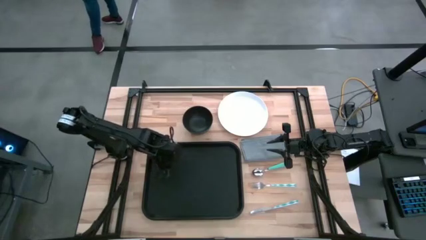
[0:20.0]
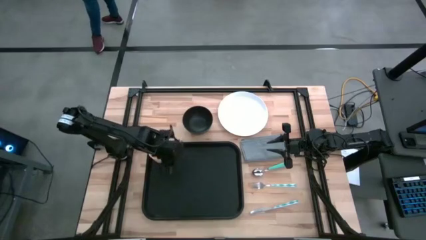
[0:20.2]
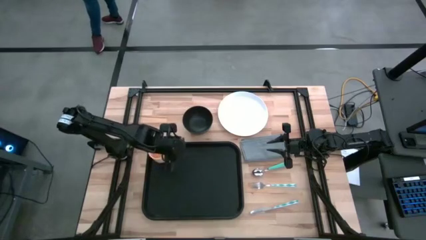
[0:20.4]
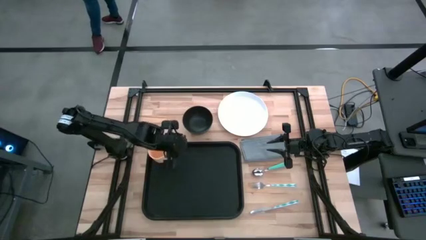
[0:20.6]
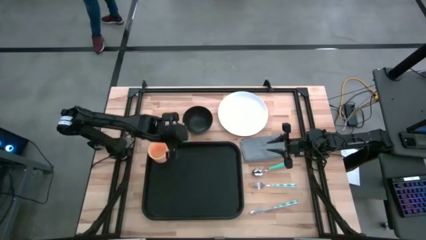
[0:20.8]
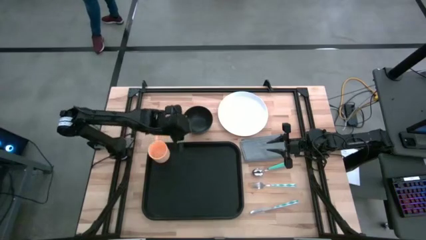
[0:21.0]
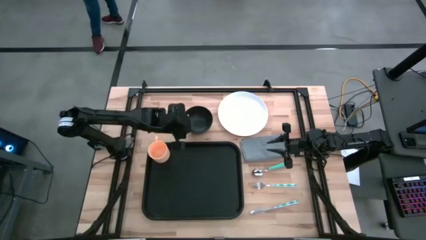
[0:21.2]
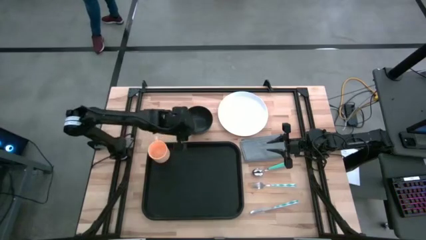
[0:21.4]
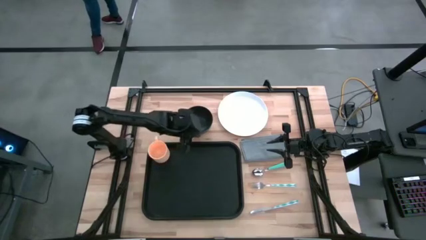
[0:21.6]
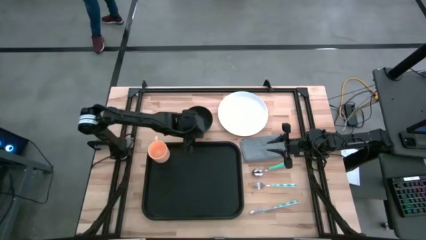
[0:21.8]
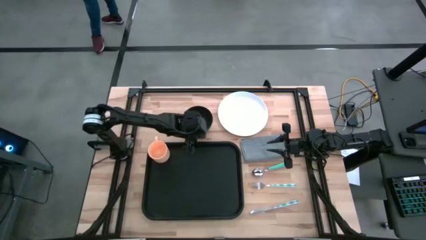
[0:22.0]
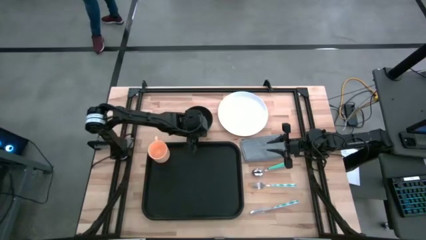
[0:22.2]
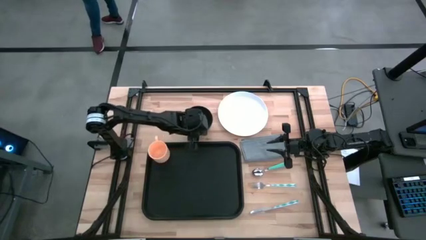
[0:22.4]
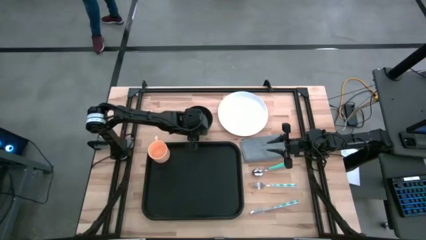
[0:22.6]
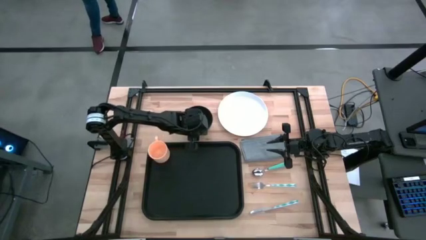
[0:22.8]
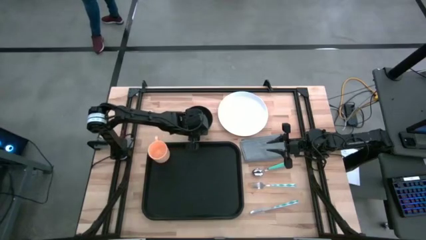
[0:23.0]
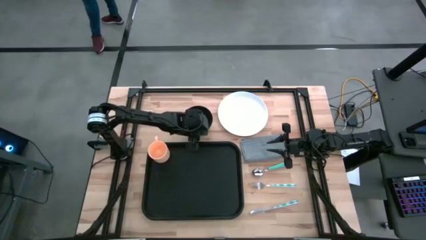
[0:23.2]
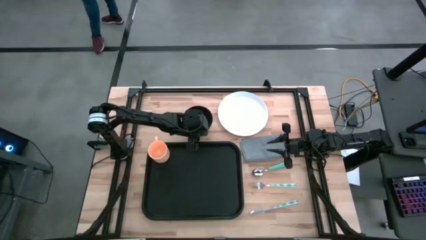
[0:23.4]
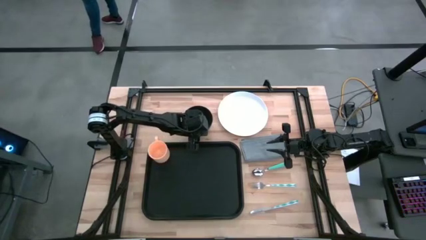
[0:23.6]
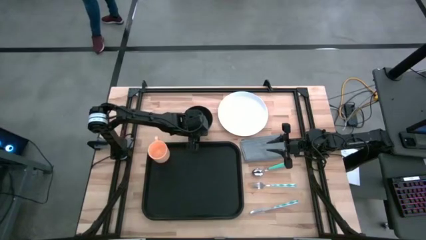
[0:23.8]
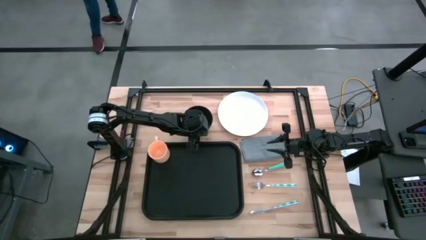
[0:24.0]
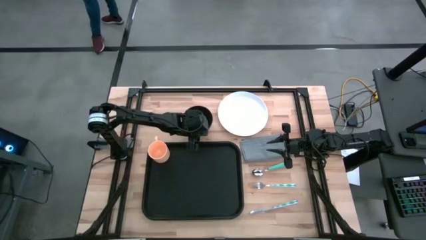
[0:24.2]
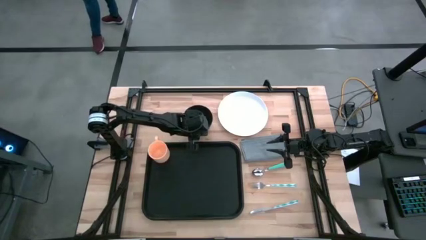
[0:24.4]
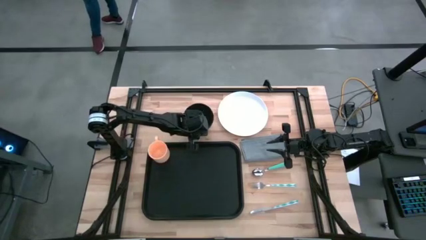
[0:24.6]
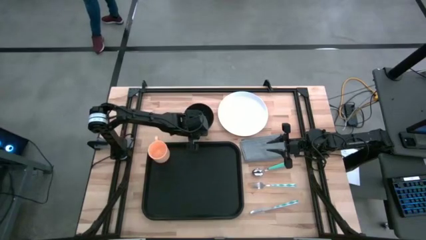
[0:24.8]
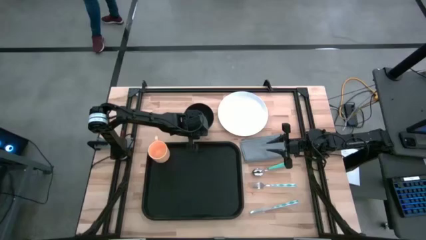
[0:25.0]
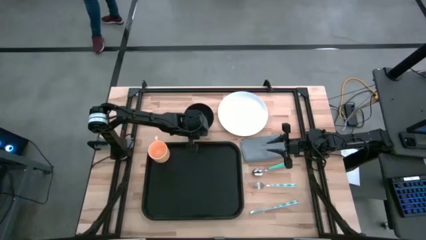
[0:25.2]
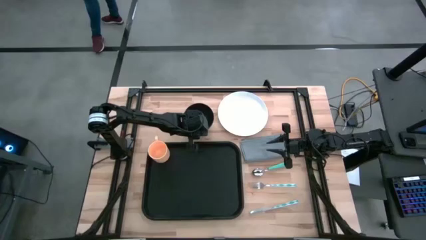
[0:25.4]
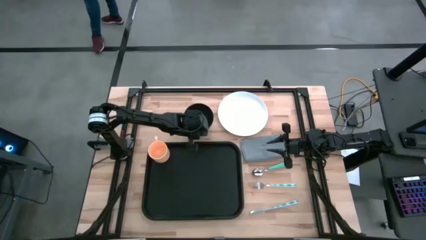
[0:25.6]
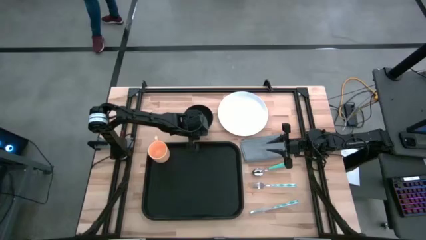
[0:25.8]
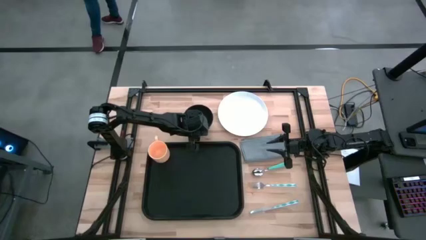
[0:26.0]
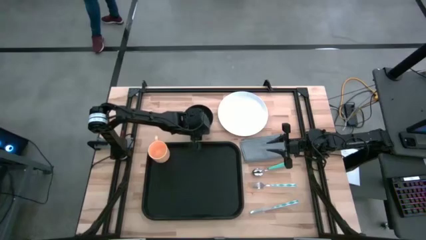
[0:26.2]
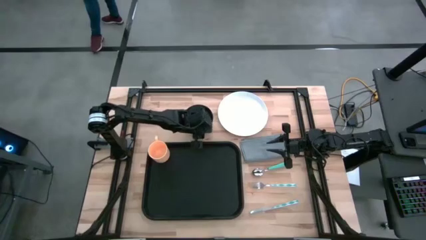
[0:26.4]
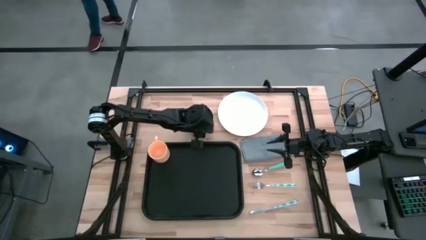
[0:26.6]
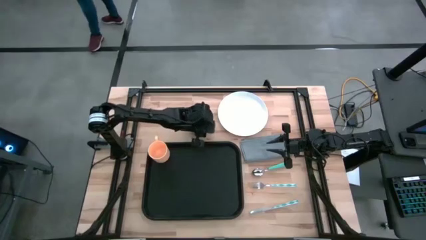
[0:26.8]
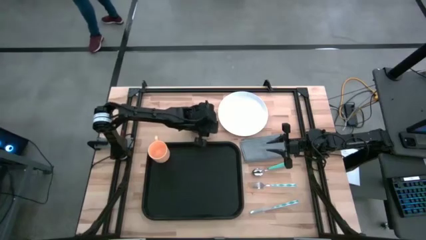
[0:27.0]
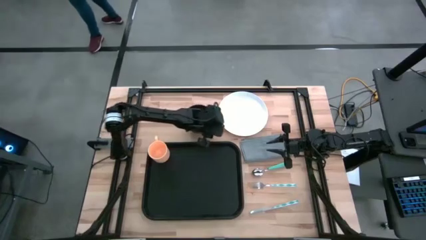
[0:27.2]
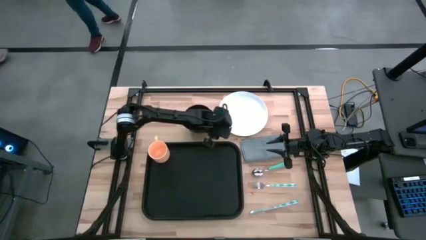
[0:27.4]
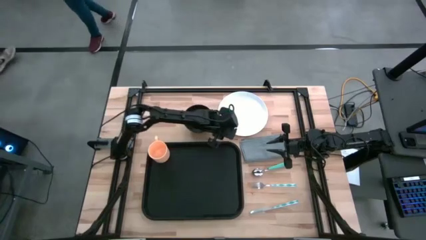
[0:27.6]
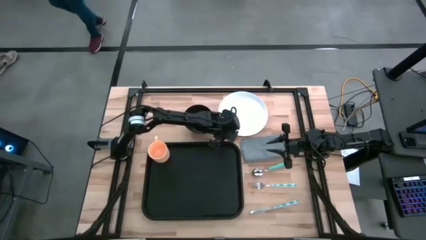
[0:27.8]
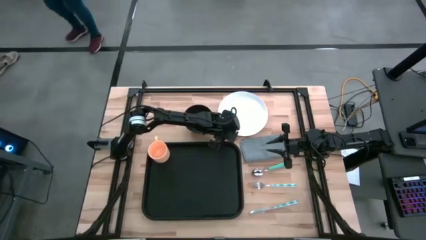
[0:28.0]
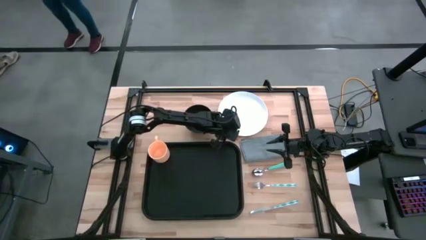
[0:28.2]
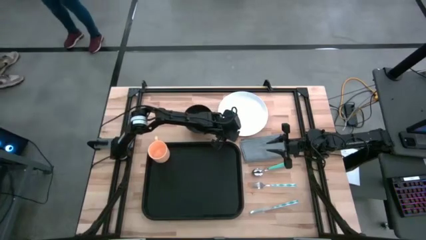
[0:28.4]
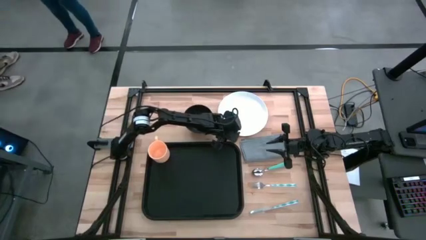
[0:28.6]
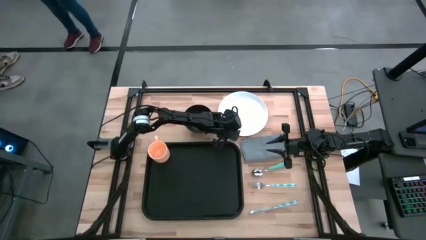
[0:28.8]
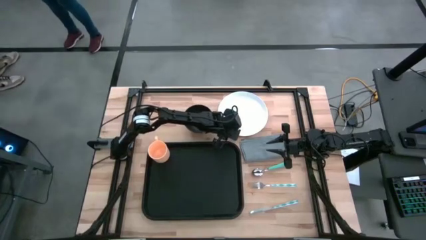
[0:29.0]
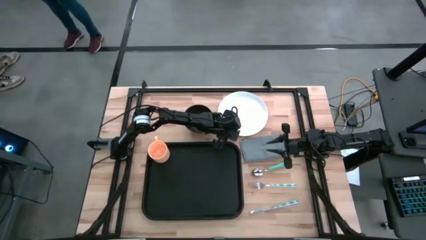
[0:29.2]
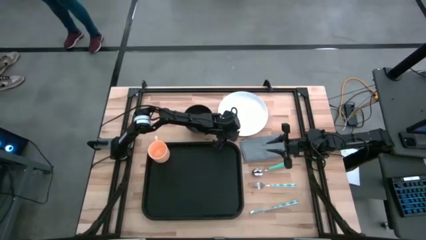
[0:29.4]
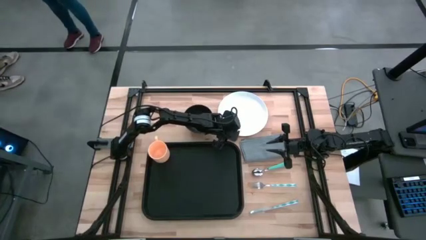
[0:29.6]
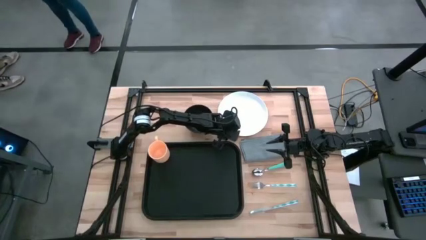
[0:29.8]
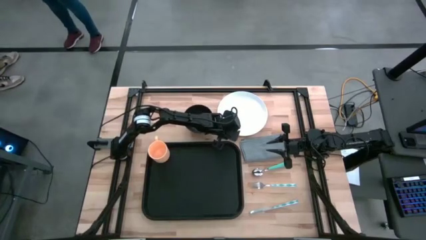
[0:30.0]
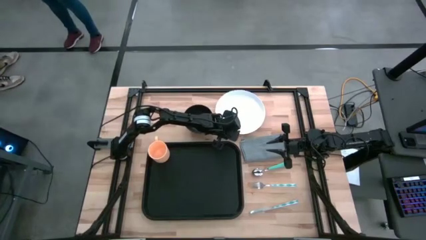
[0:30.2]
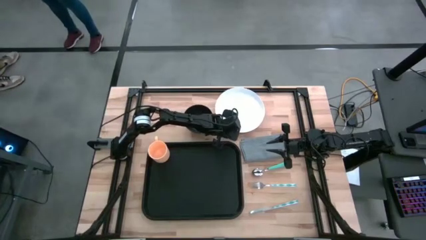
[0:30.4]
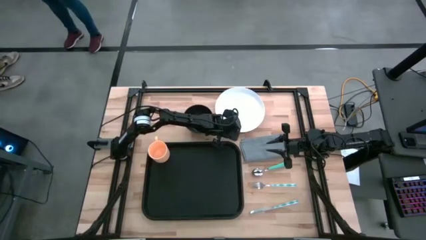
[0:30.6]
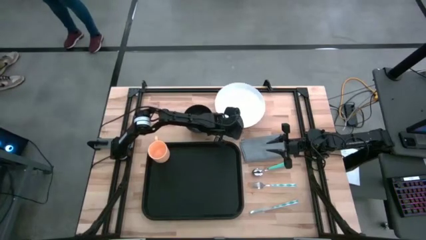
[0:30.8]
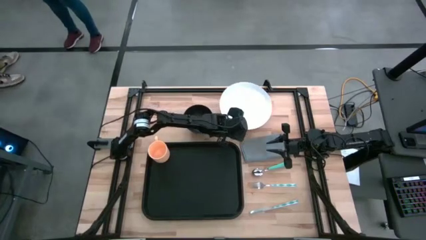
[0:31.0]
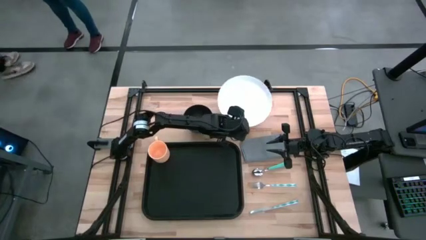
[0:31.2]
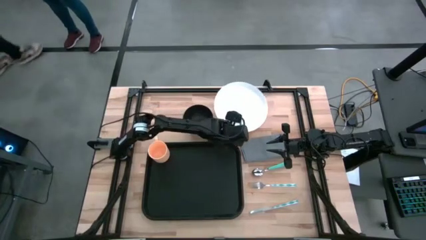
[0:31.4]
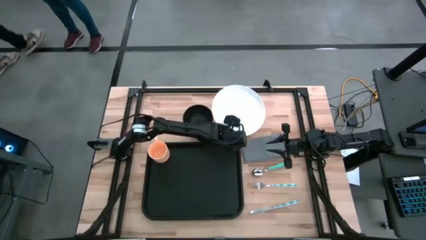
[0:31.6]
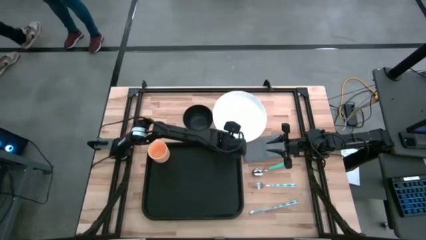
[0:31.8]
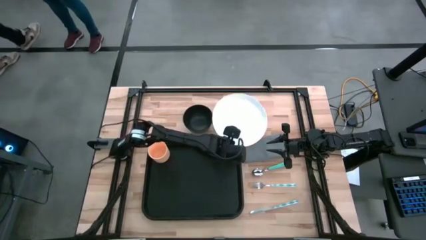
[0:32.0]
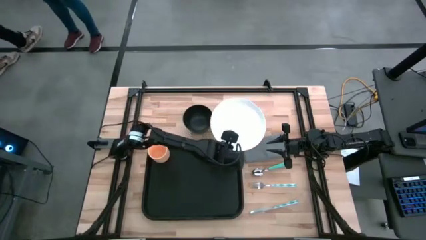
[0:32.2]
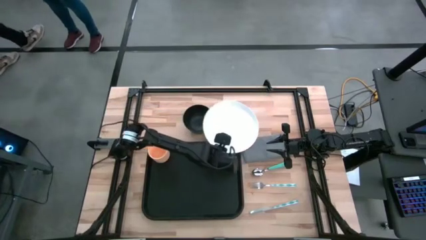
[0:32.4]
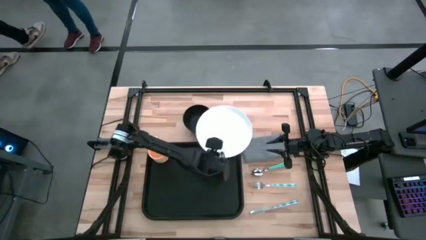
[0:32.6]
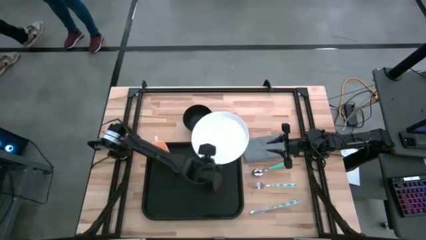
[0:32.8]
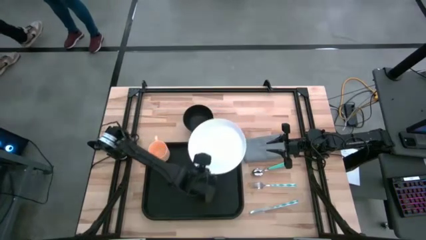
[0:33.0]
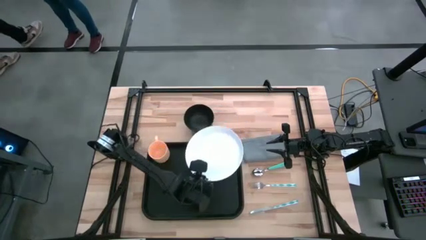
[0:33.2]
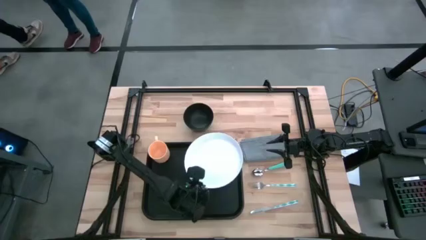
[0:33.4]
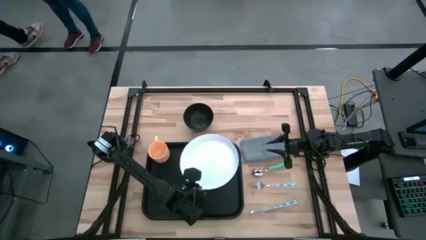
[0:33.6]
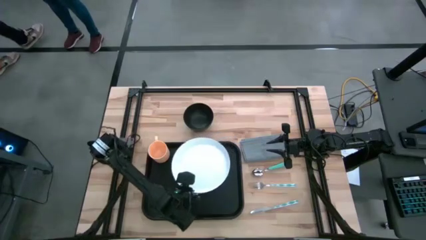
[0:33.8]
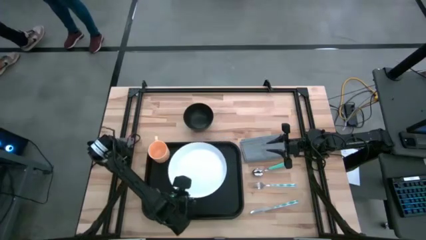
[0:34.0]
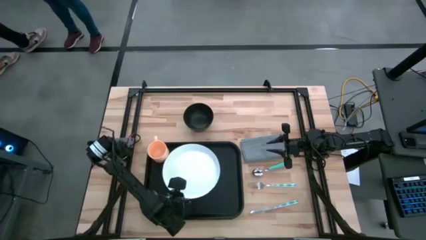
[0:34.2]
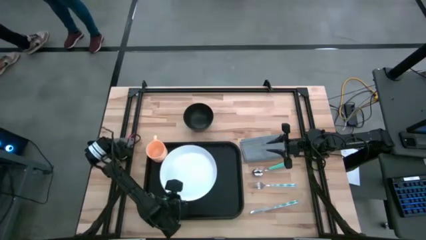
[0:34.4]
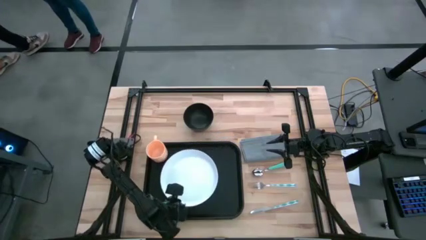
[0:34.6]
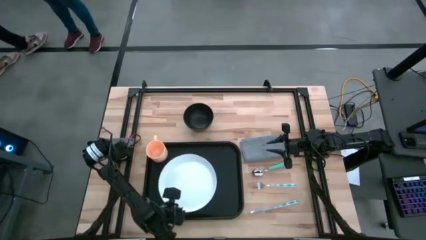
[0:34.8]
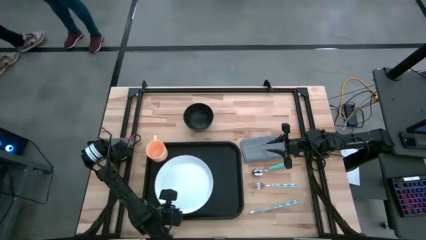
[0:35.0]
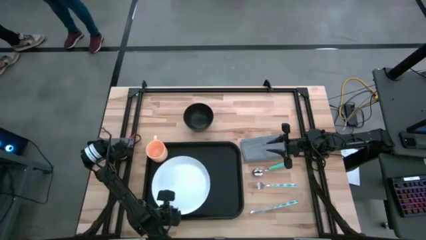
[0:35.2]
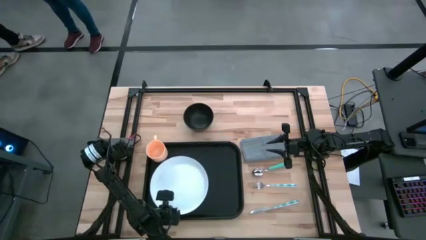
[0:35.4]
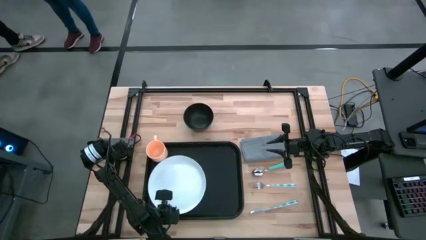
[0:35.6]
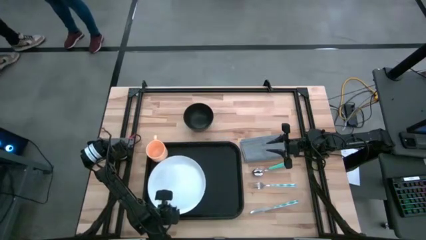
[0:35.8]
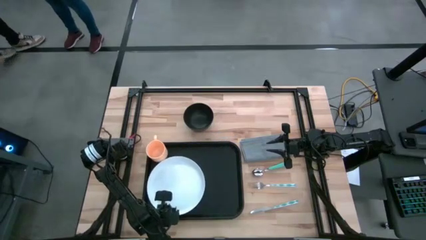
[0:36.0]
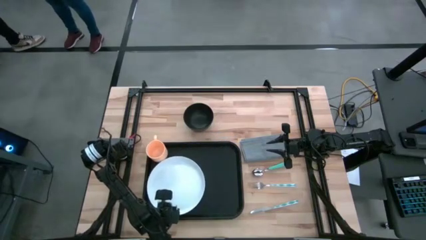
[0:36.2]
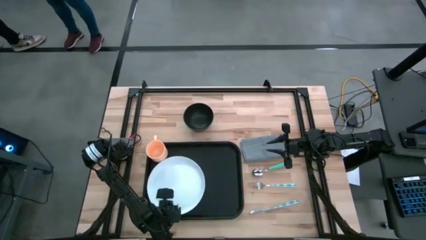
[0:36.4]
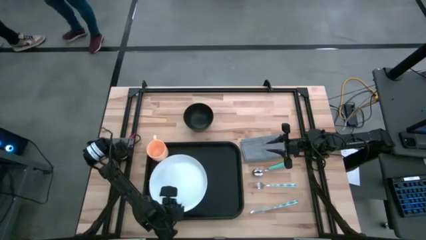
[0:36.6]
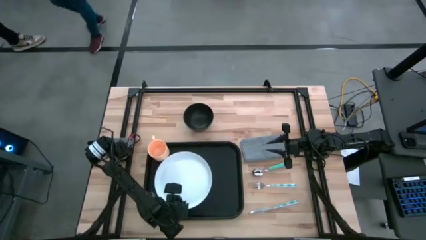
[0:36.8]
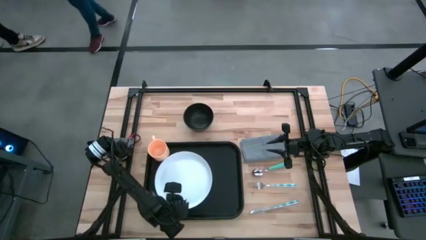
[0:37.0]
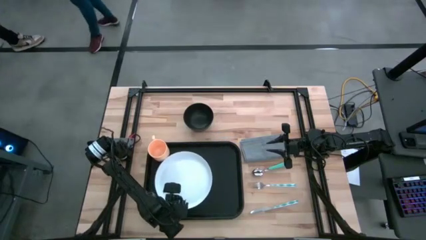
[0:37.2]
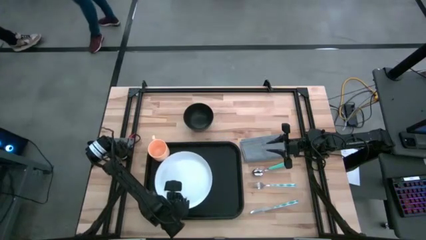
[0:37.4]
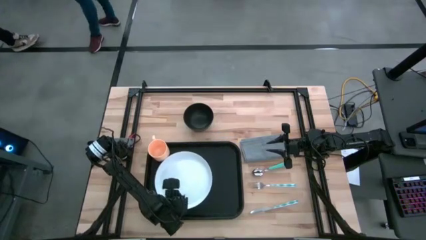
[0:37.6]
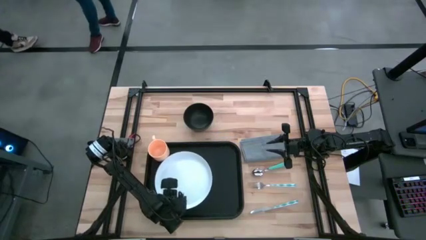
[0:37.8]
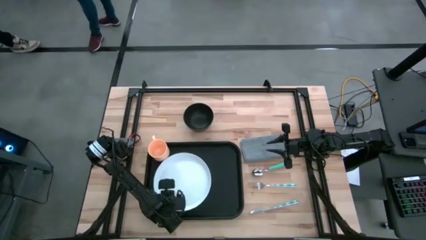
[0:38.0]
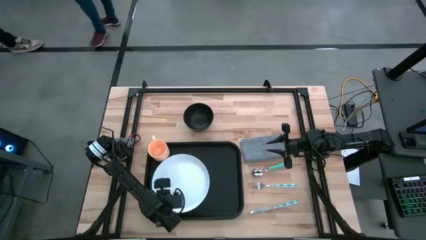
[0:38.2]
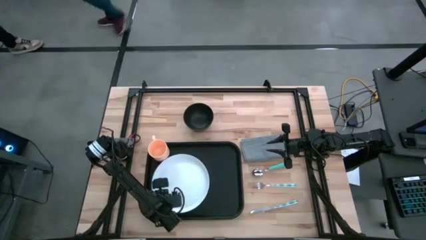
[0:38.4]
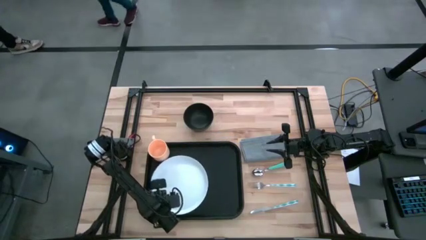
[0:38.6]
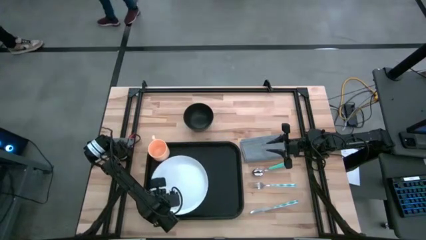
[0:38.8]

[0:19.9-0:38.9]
Task: Set up tray
Put the white plate to the bottom right of the orange cup on the black tray
